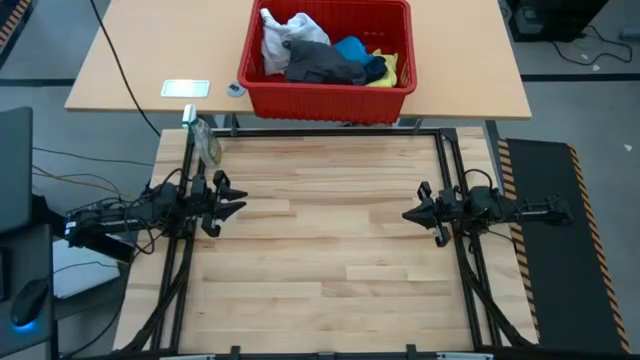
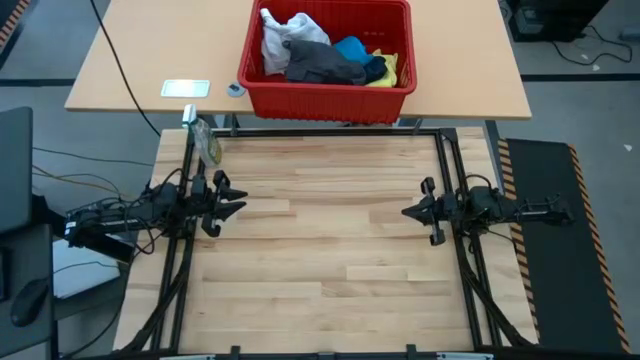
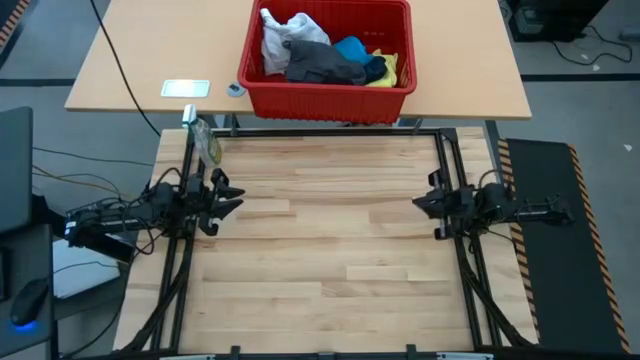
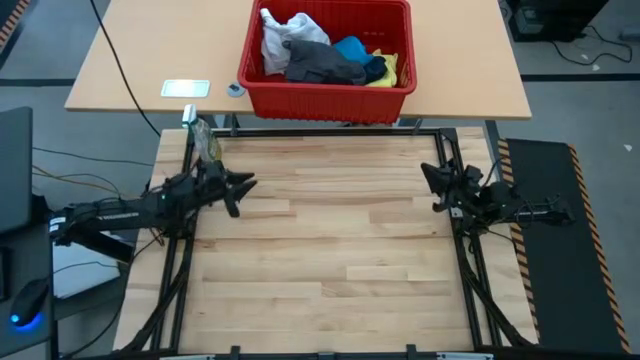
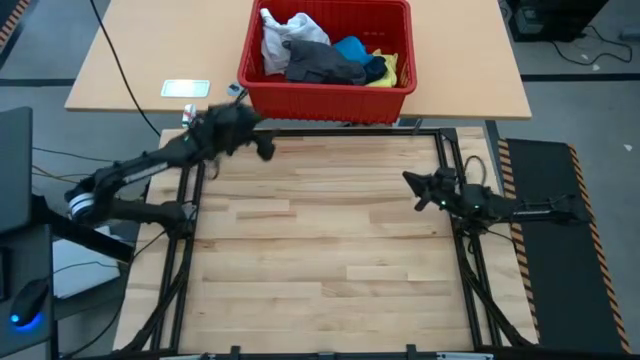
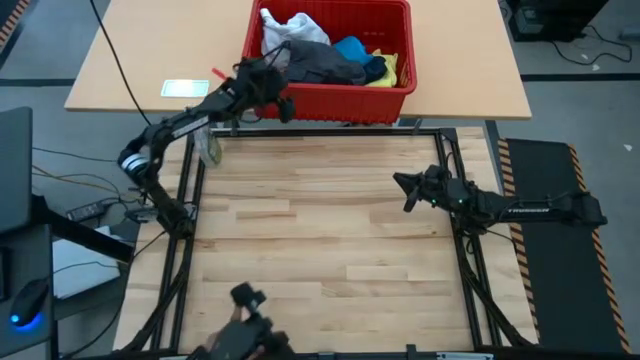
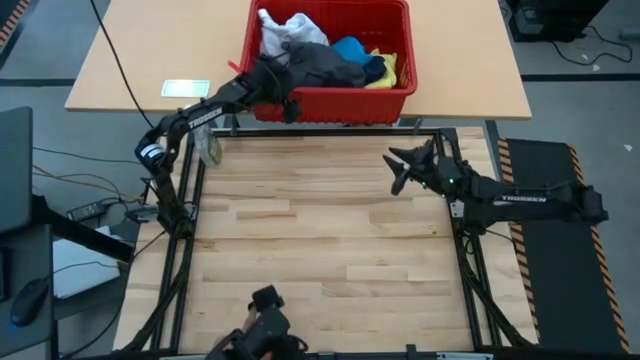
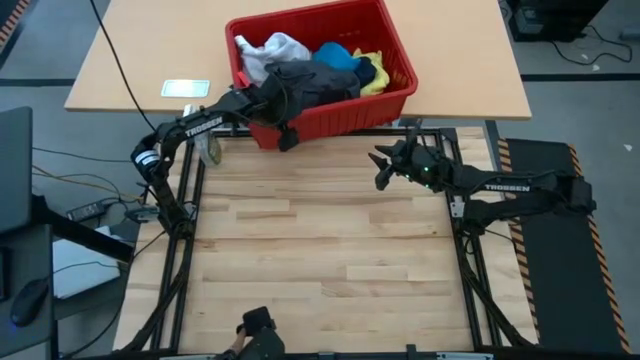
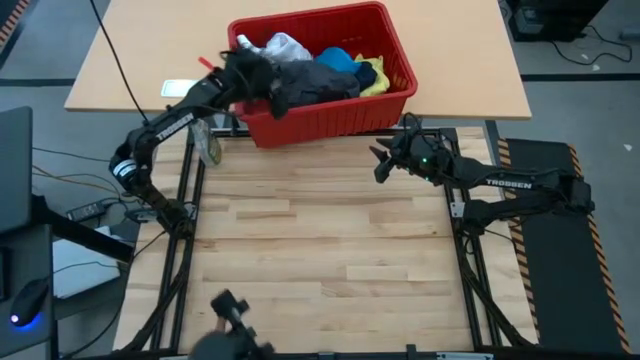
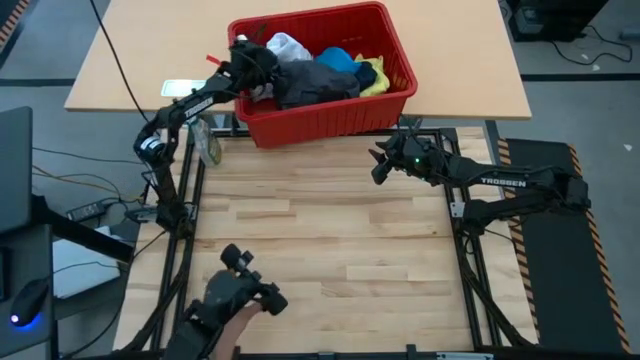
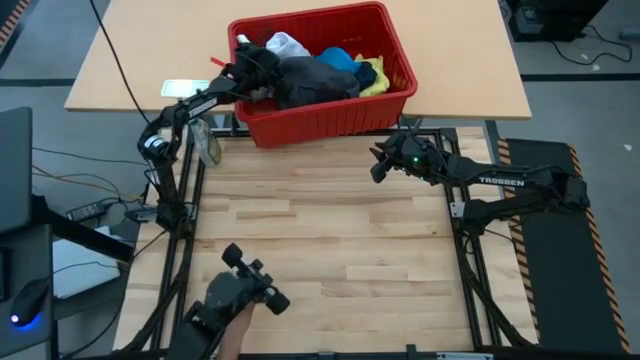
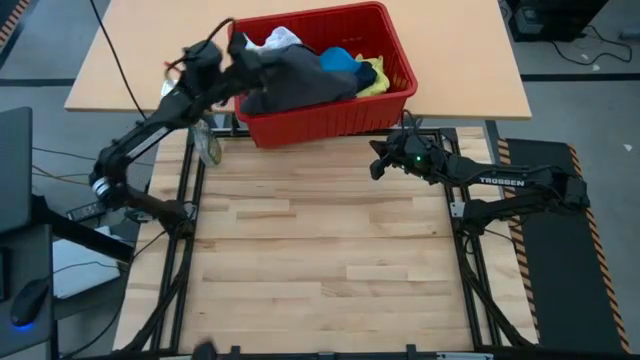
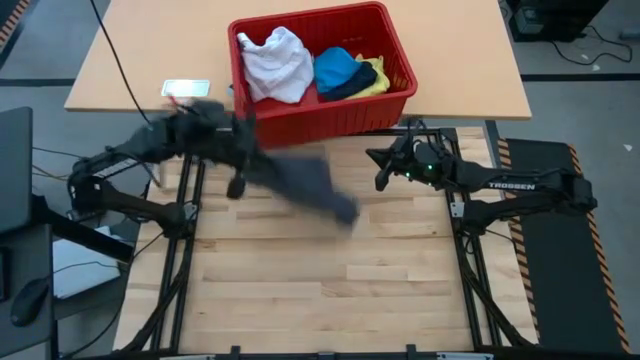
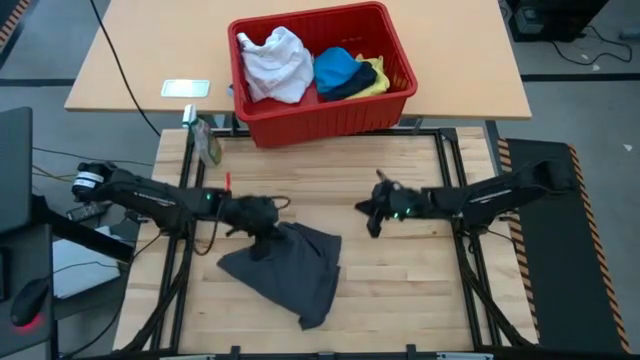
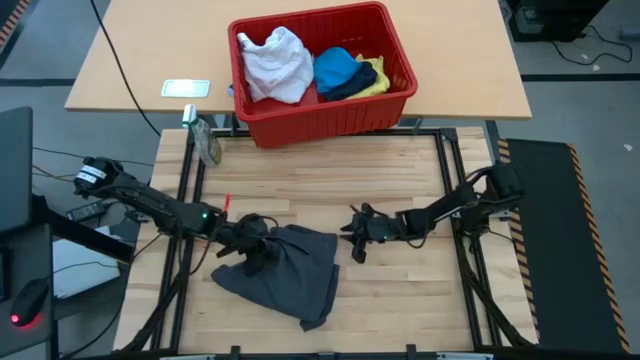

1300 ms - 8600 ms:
Task: Fold laundry
Remove the black shorts from the red bin

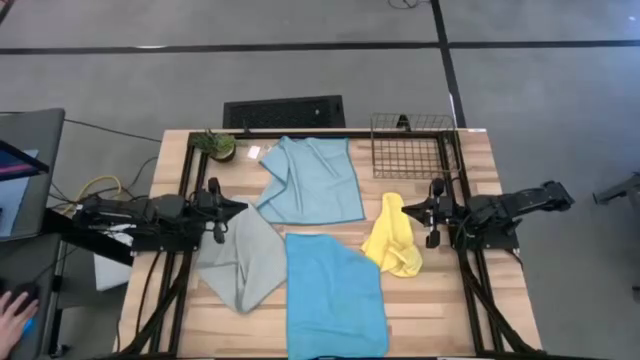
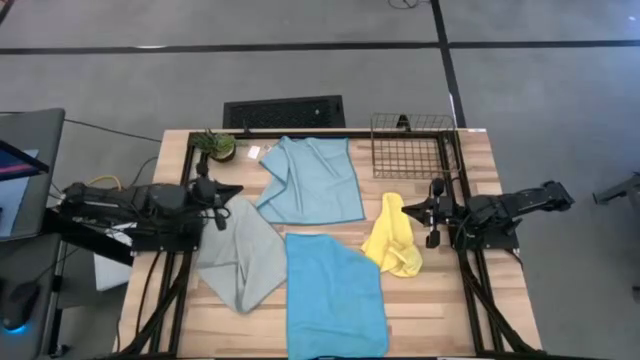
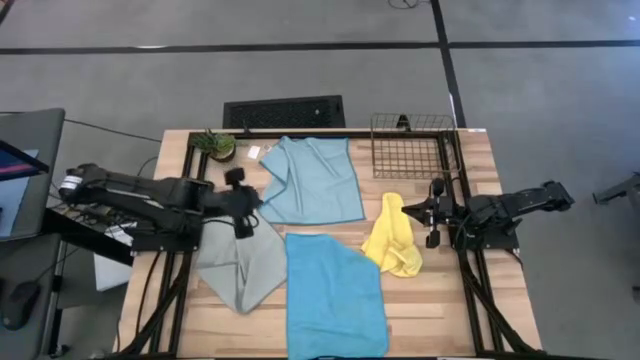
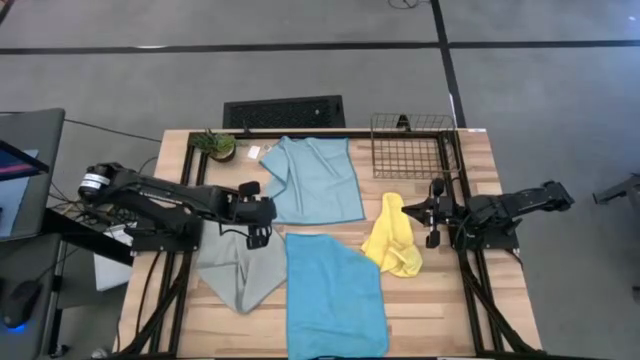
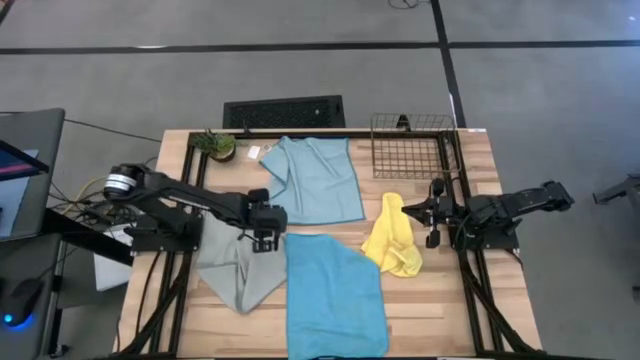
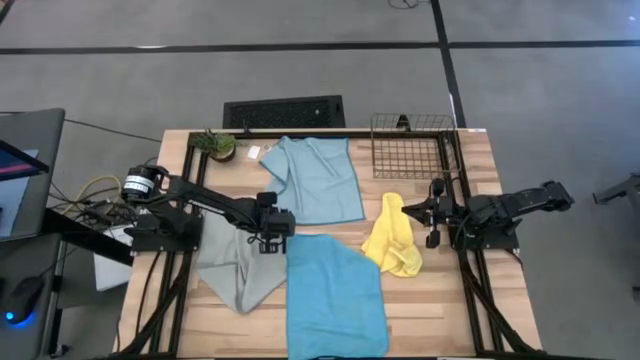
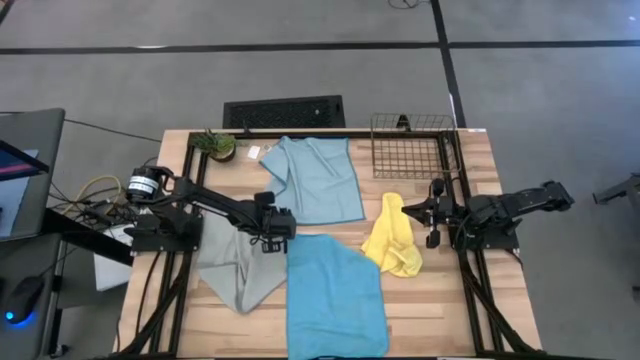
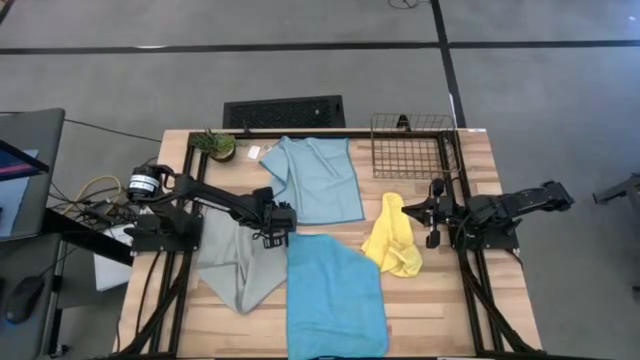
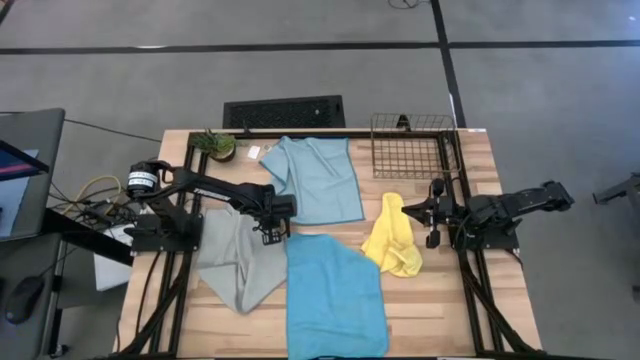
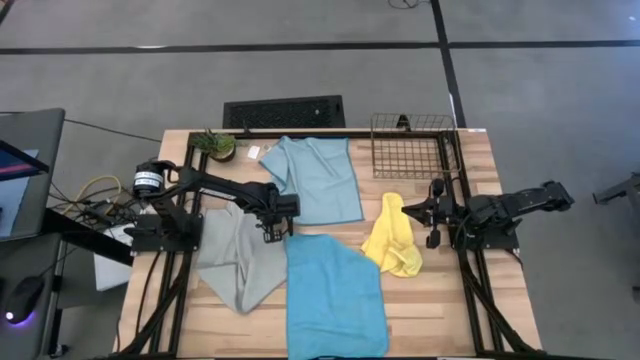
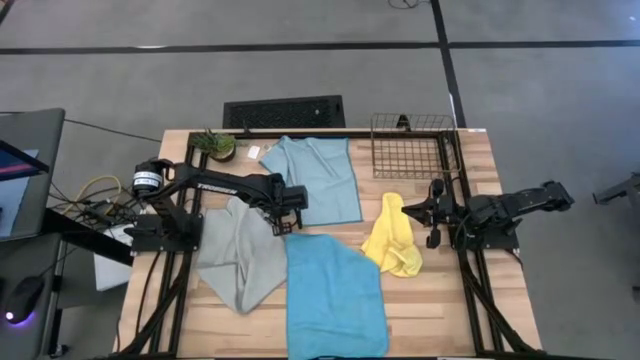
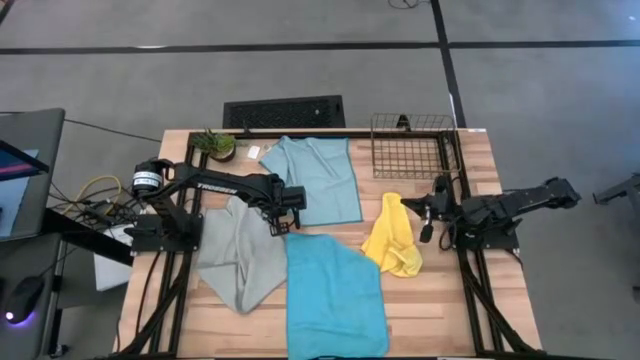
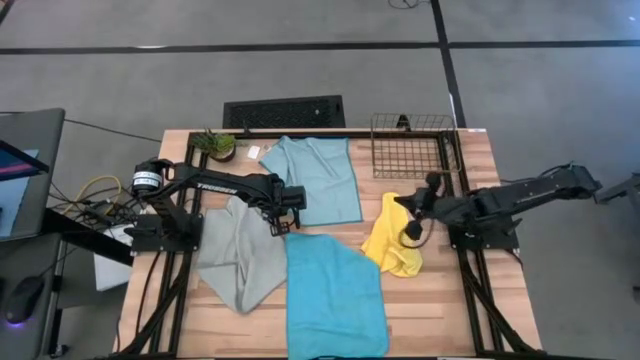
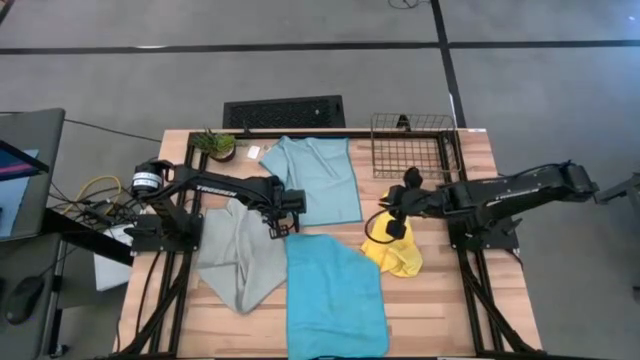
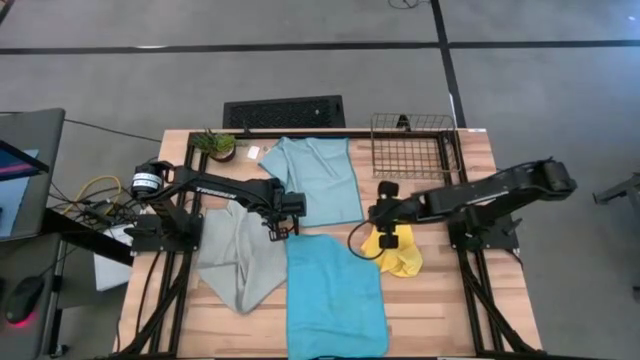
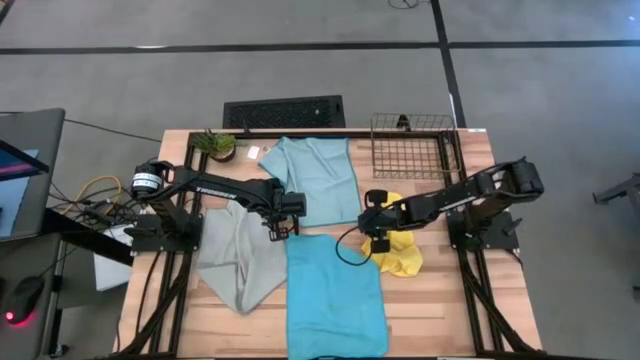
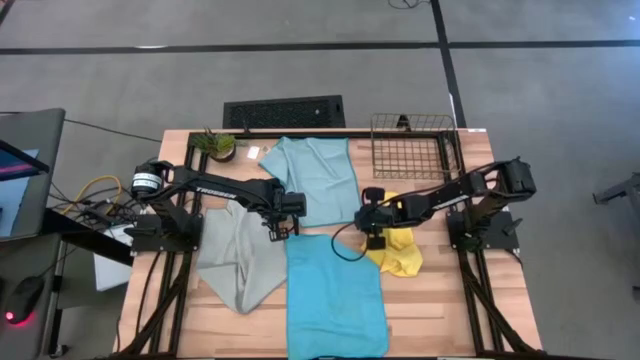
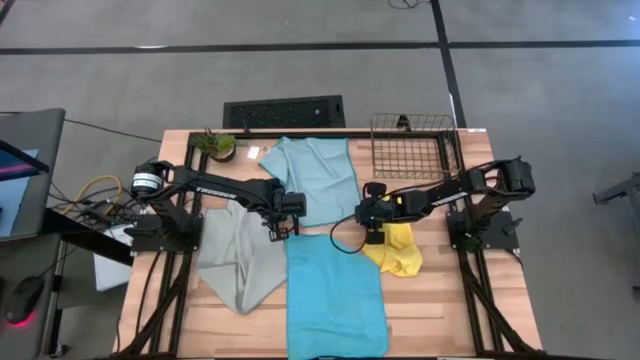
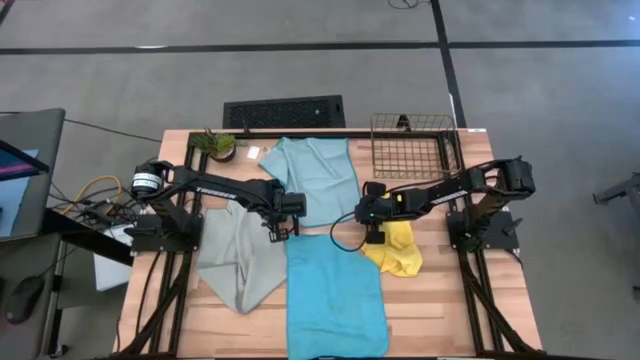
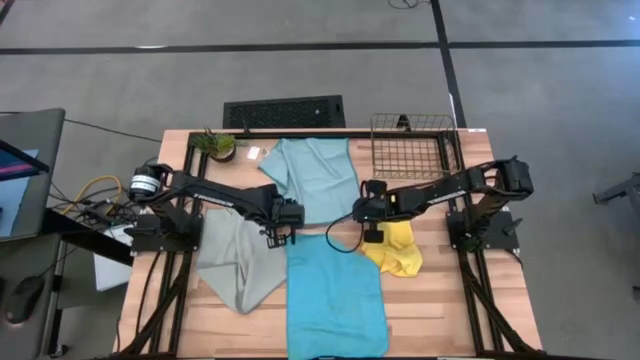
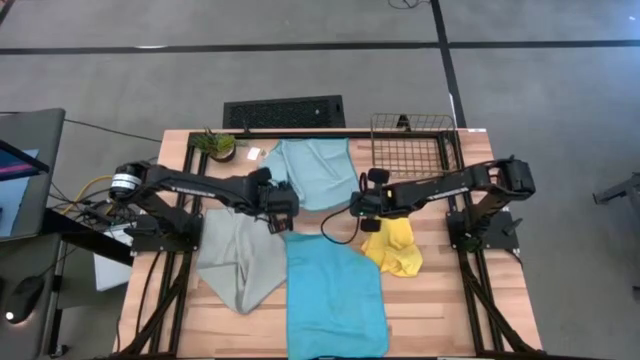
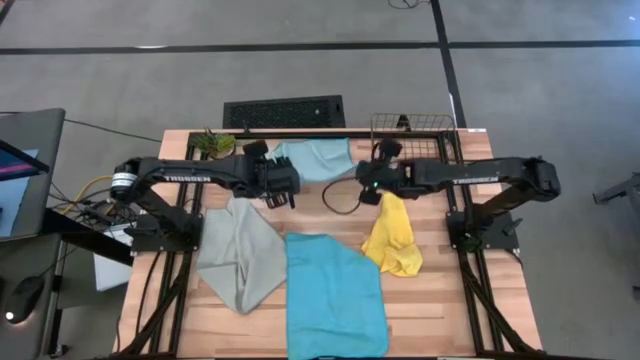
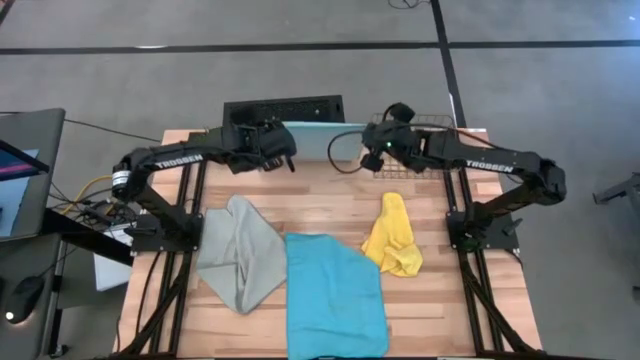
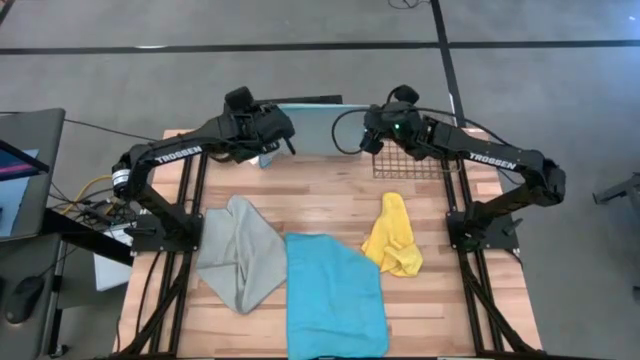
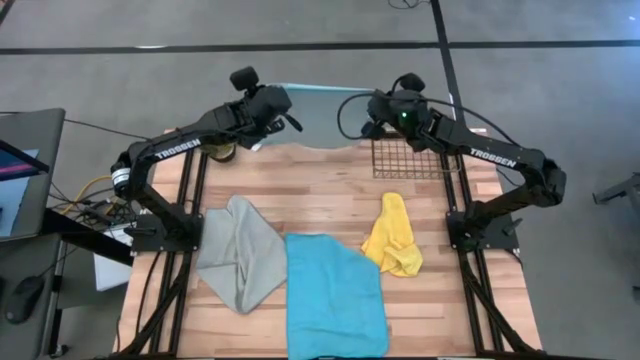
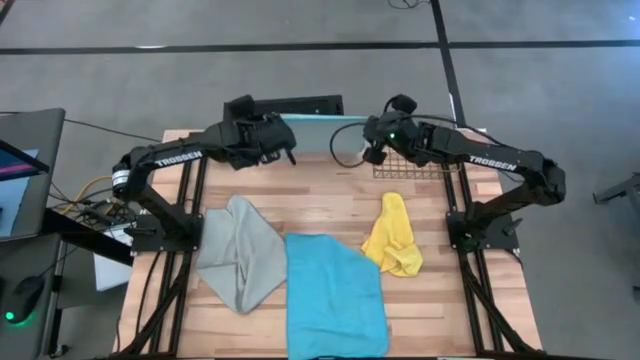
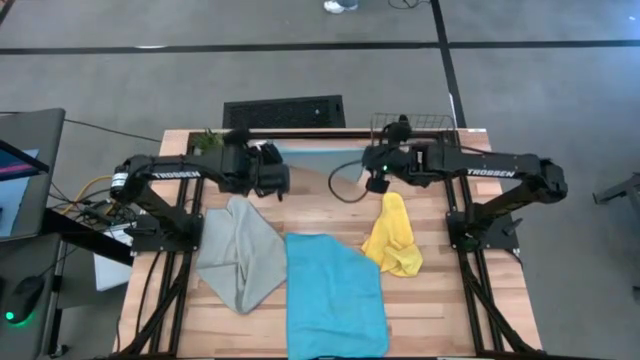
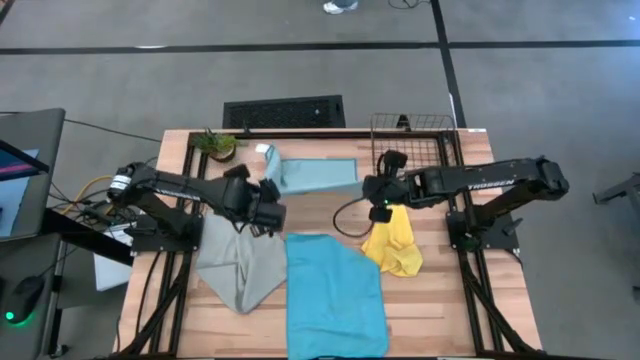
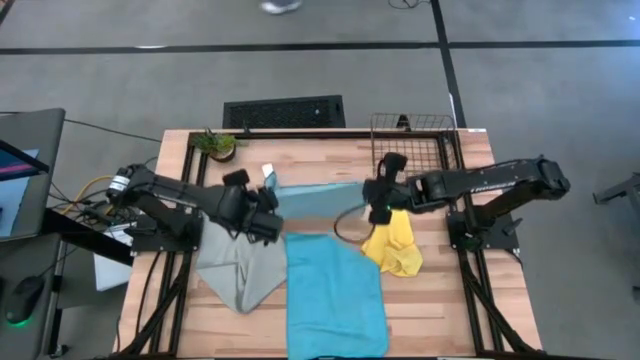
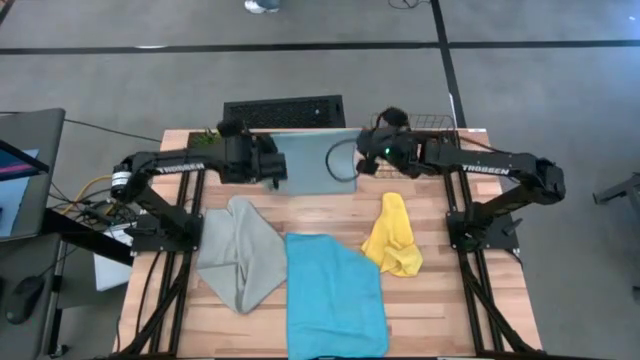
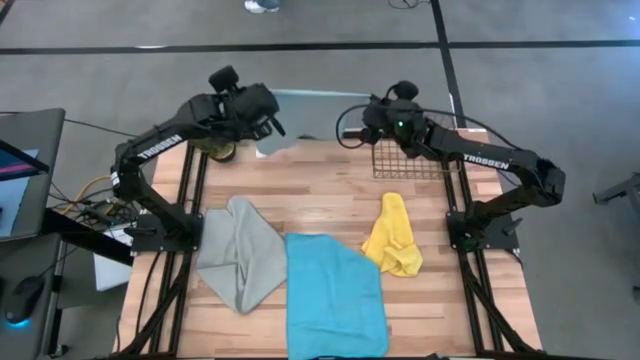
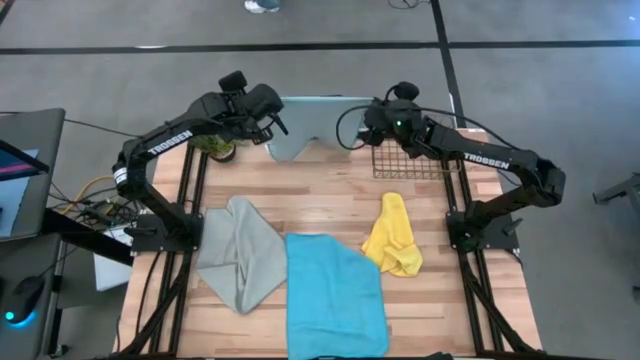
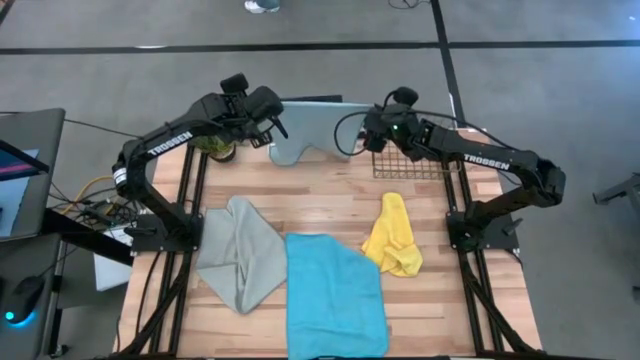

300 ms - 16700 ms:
Task: Fold microfiber towels
Fold the light blue microfiber cloth
